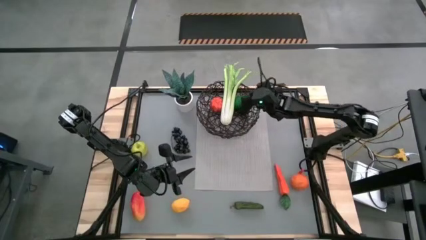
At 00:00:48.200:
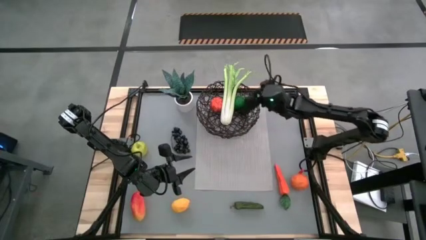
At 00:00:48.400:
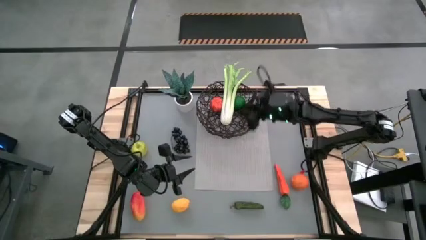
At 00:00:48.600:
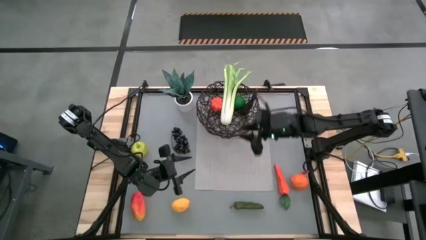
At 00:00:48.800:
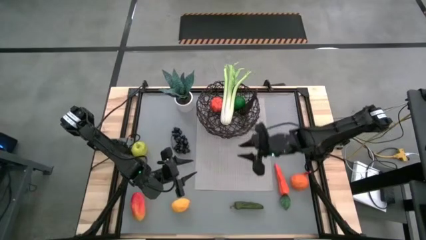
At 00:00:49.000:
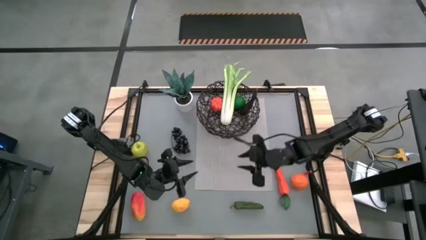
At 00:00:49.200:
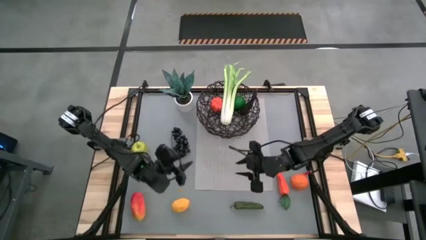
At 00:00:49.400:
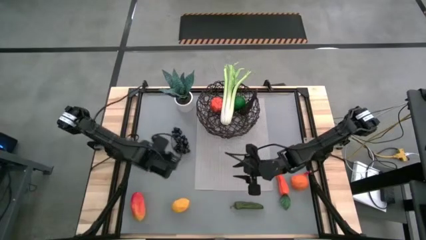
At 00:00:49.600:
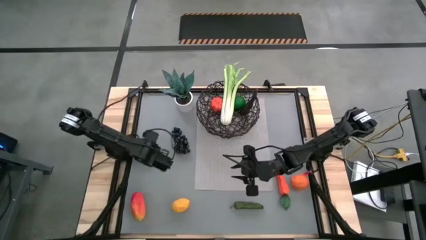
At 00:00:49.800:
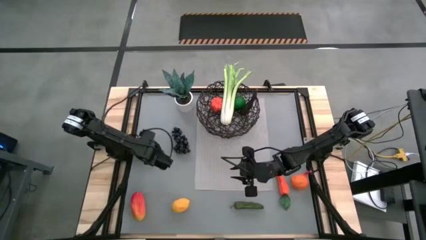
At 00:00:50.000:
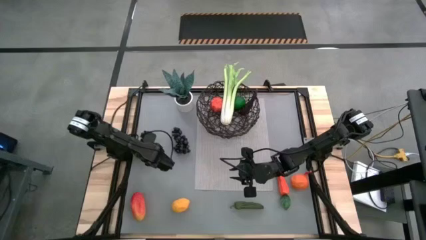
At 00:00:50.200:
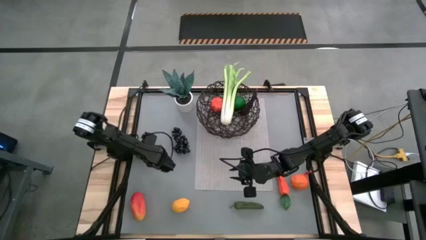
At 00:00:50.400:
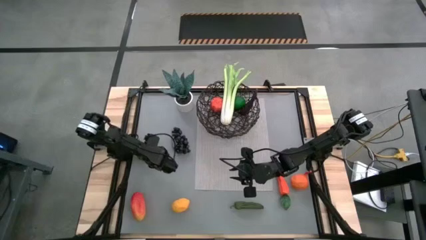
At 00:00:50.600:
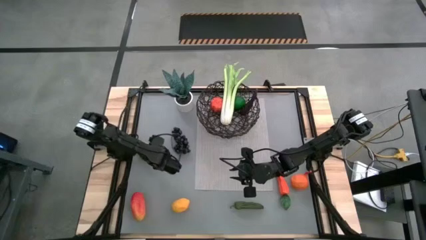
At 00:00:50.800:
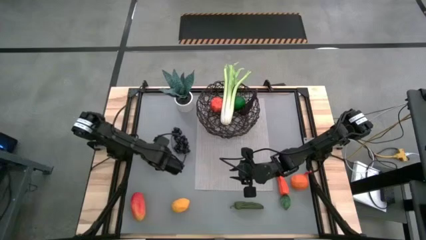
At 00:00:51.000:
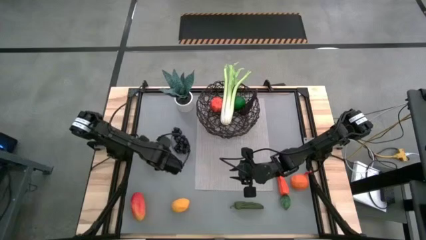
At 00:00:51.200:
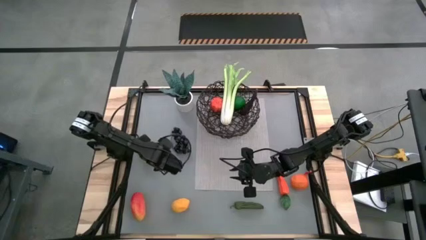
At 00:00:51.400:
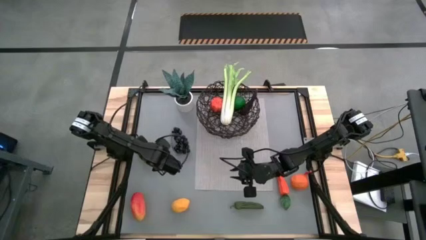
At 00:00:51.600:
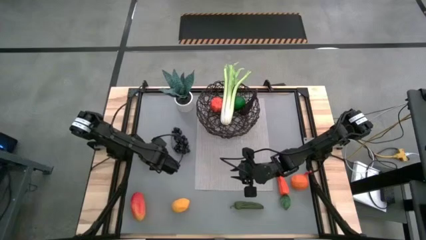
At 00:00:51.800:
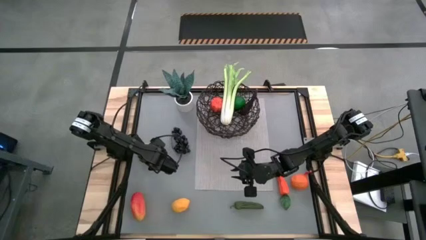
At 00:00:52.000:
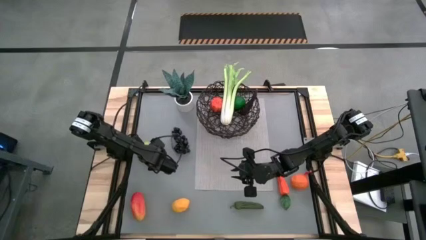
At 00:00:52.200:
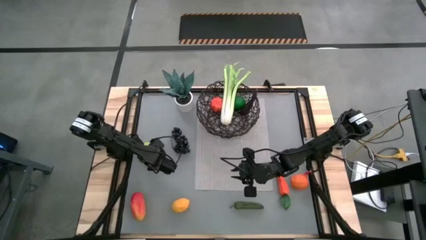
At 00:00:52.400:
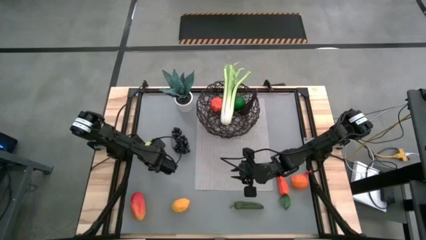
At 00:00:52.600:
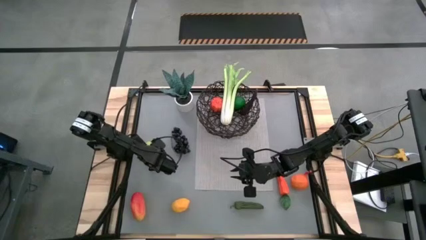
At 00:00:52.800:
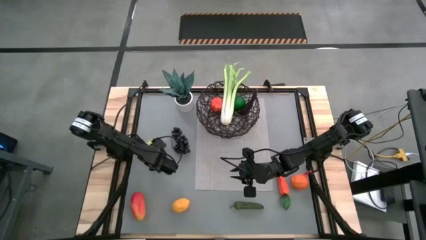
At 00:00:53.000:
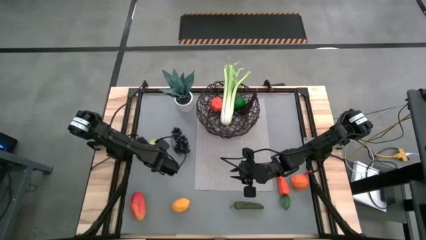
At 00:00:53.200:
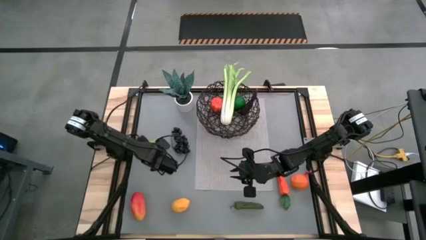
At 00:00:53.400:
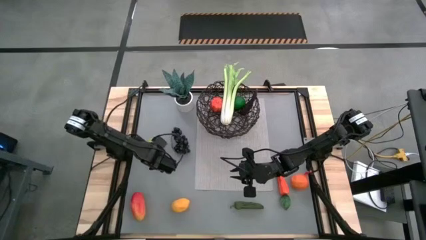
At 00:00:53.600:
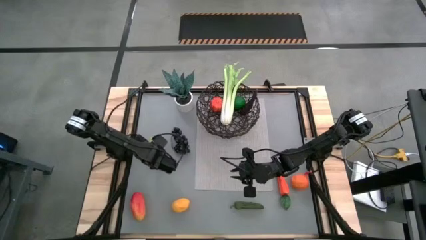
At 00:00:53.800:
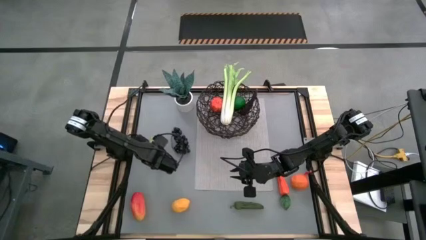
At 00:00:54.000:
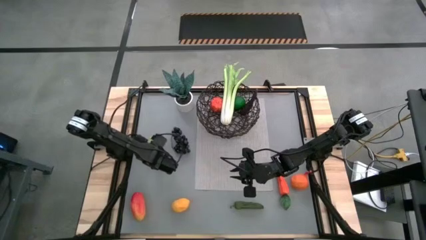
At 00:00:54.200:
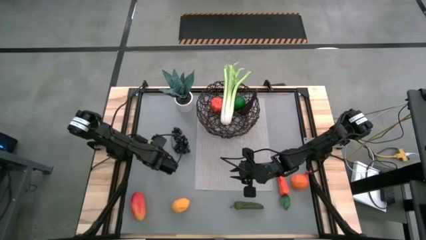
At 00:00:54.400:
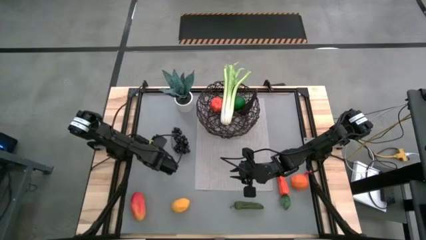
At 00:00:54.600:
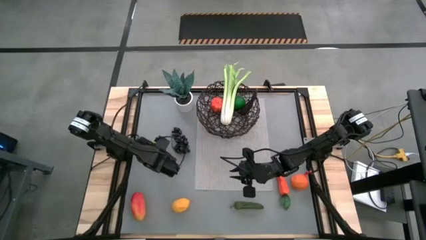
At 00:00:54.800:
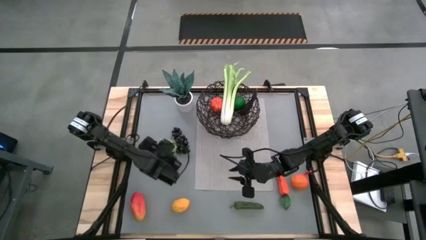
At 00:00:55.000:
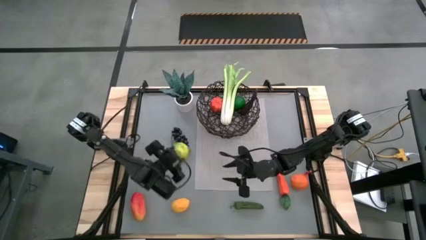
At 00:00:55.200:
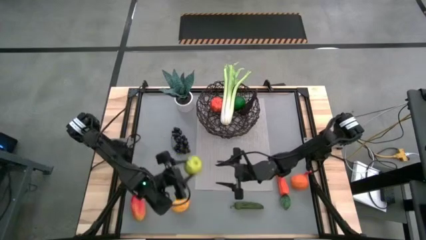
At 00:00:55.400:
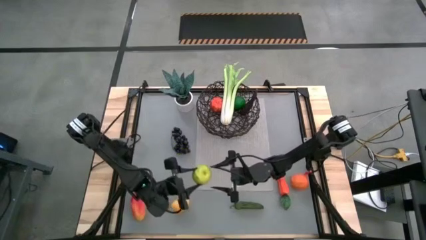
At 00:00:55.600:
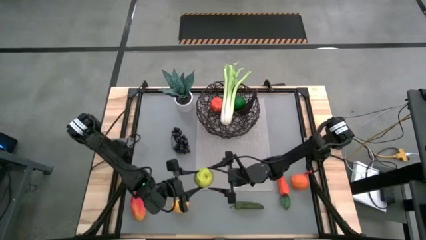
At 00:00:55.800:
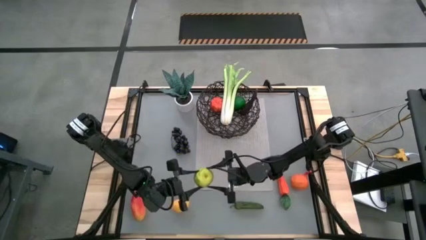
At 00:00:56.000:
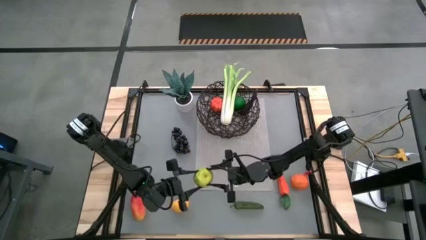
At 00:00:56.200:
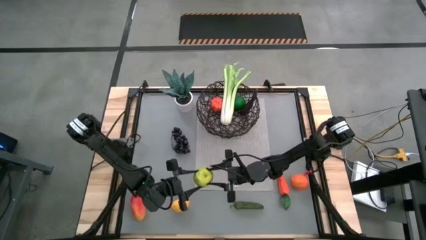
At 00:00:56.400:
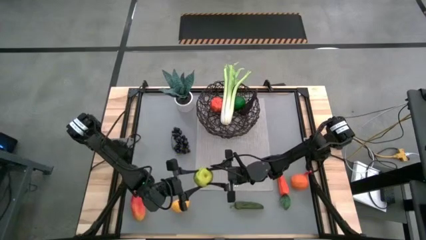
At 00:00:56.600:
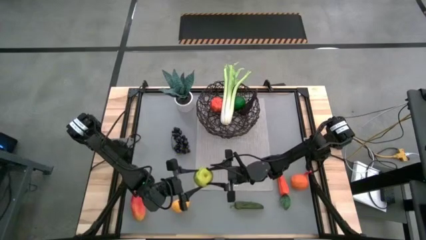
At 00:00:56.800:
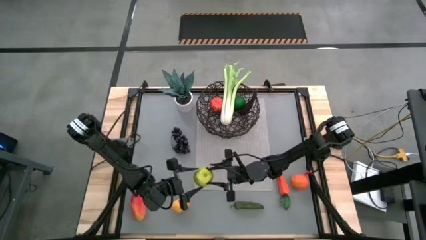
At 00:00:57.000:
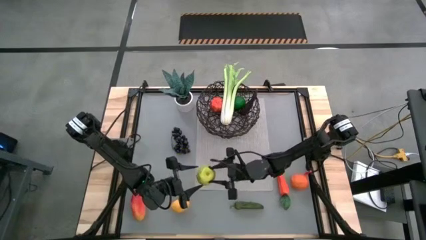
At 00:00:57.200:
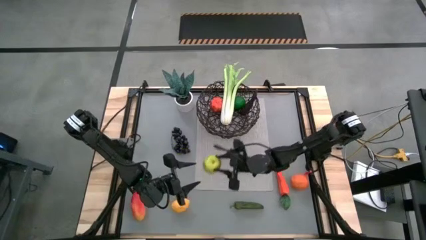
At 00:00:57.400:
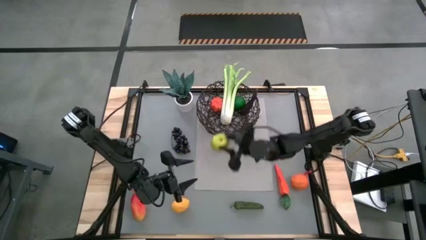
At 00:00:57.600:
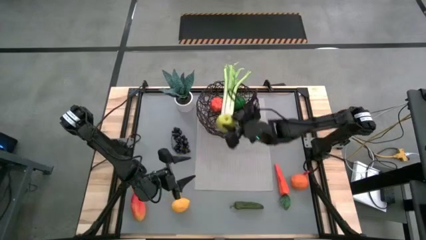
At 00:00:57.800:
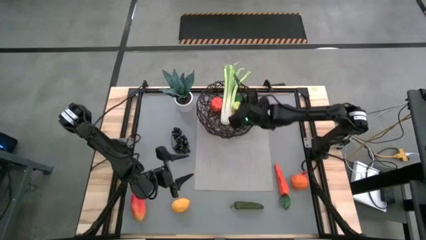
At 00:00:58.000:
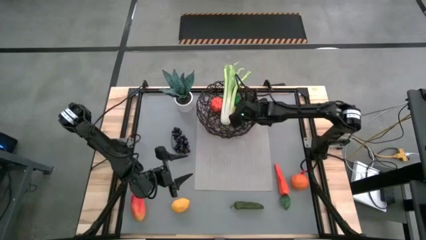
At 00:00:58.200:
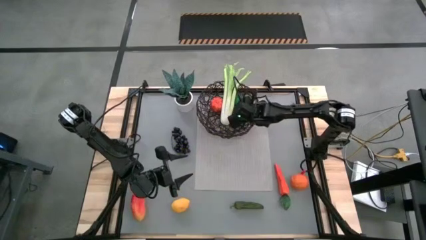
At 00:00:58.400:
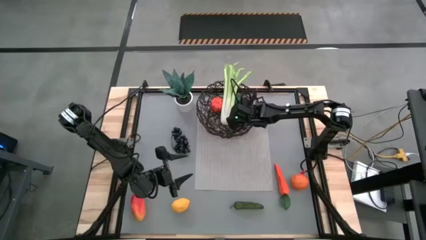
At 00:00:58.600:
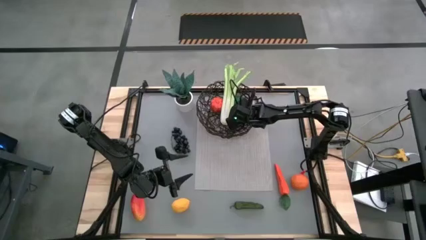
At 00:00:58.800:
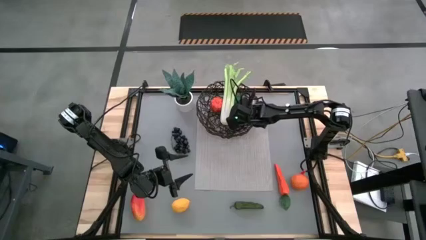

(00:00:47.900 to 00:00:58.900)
Task: Build produce basket
Put the yellow apple into the black wire basket

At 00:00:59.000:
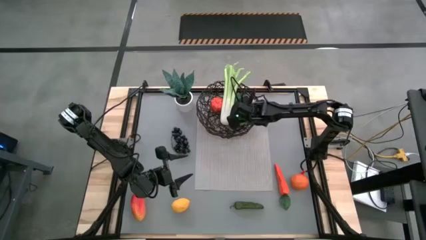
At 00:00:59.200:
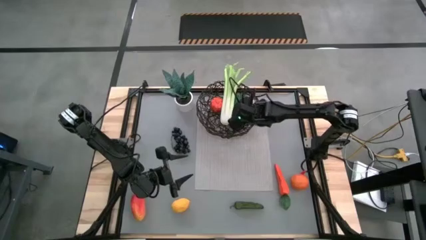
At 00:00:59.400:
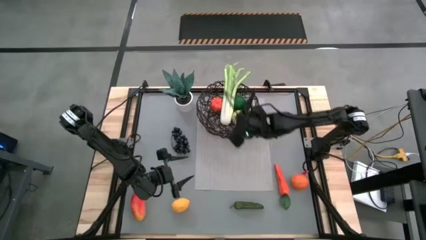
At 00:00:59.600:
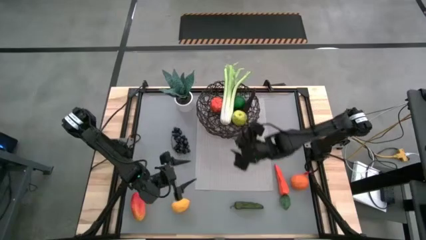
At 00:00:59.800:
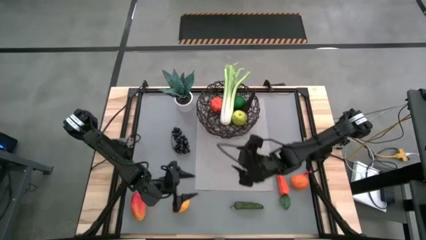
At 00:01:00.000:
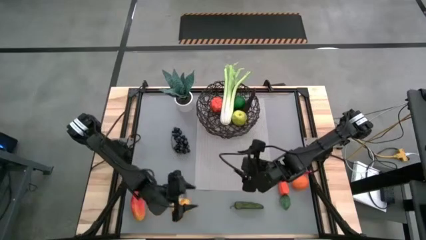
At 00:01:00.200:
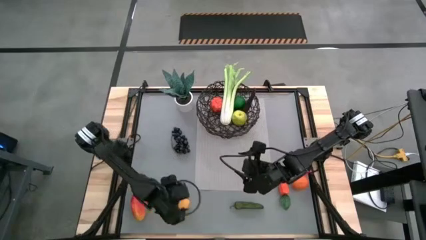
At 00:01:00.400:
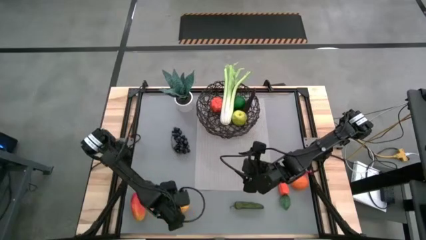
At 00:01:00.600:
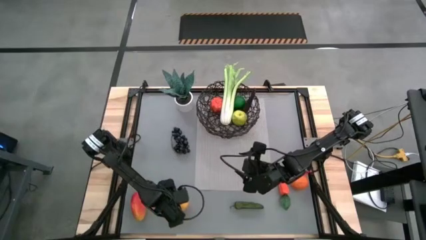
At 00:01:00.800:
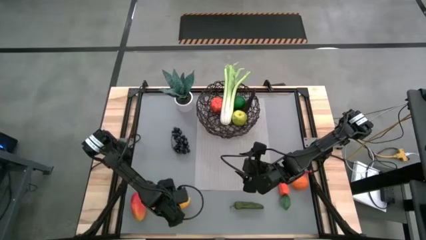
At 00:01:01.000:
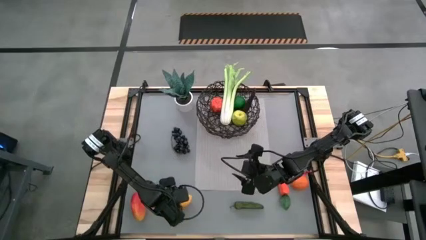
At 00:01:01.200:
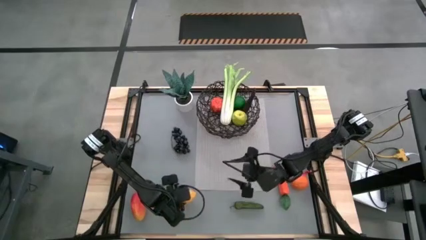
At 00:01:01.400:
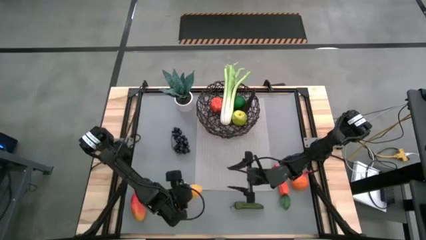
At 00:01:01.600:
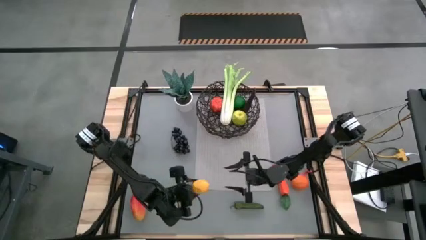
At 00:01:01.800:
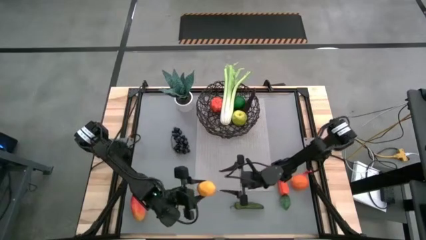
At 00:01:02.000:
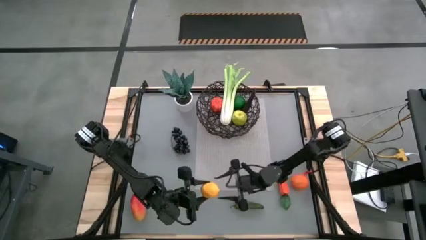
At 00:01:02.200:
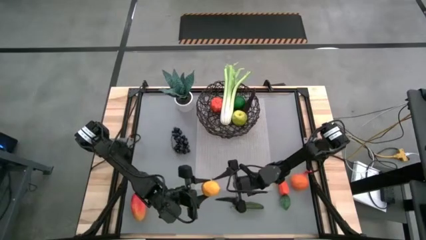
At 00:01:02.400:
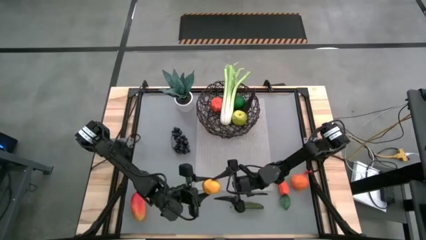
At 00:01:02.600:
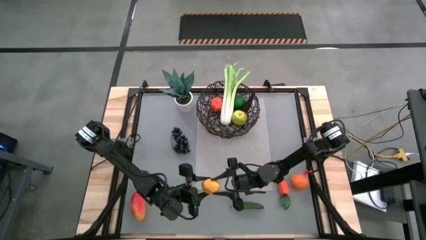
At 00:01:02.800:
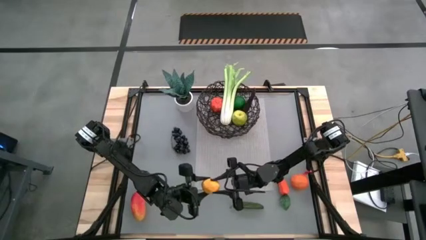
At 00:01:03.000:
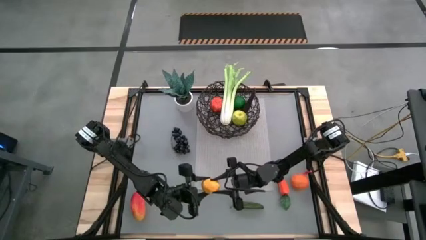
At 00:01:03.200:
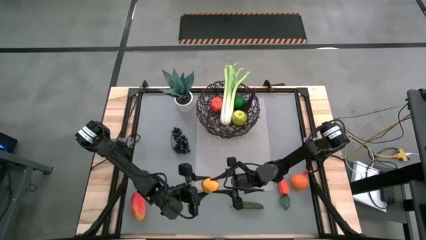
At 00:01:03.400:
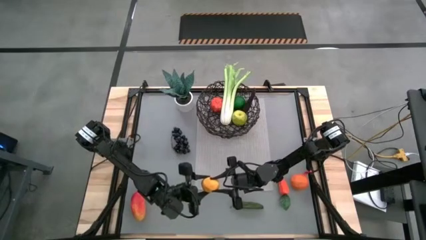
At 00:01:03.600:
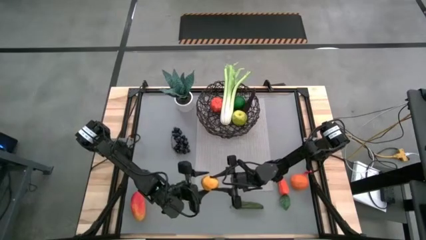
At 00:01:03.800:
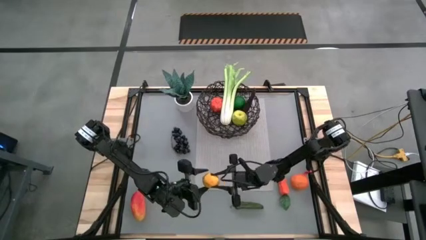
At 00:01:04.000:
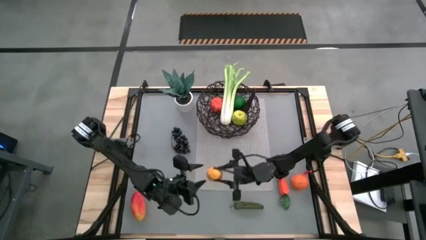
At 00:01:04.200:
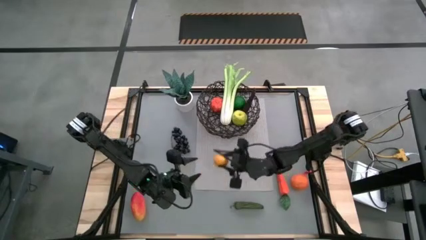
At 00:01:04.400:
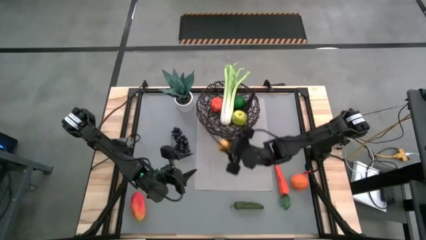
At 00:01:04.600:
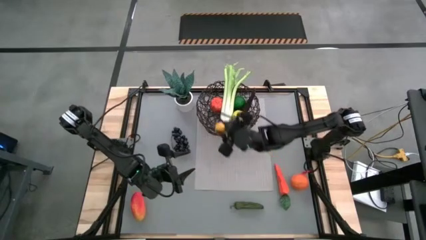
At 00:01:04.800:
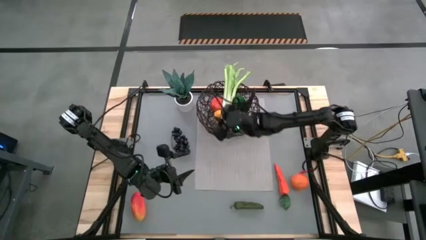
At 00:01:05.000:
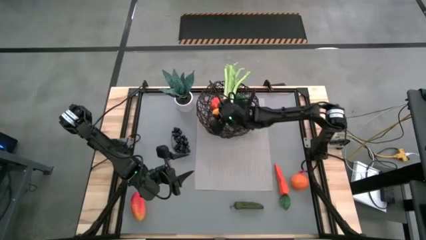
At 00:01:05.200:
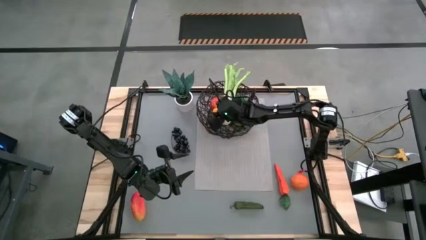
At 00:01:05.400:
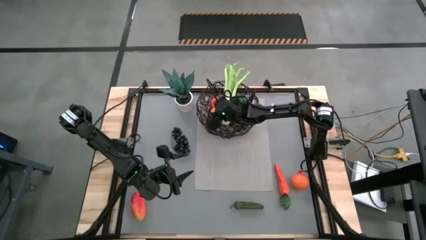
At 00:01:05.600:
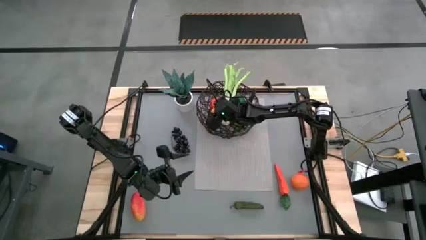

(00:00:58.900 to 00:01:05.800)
Put the yellow lemon into the black wire basket
